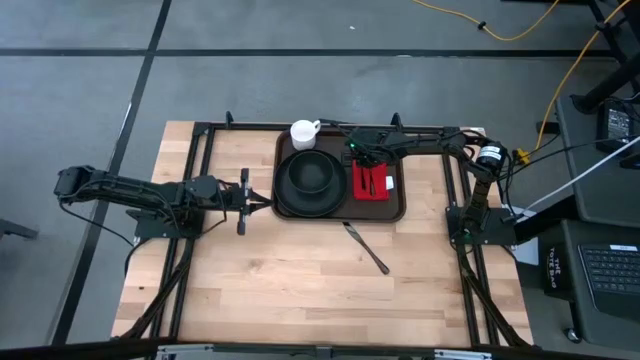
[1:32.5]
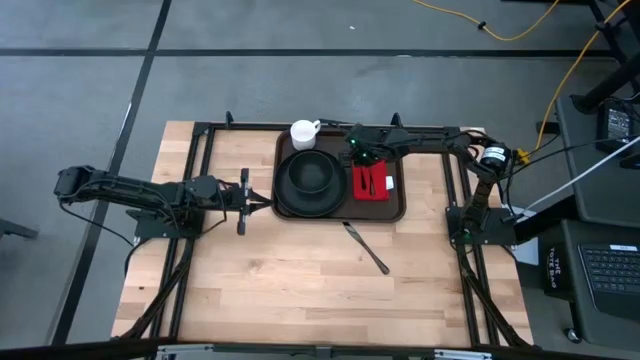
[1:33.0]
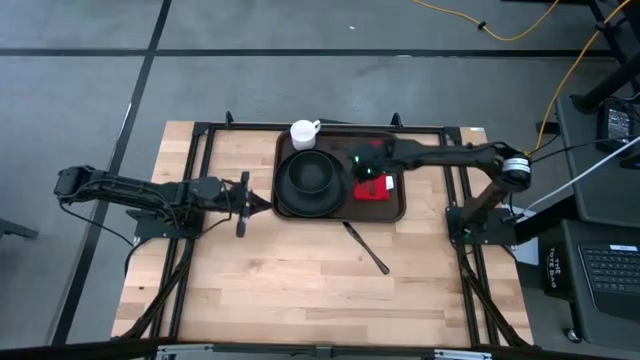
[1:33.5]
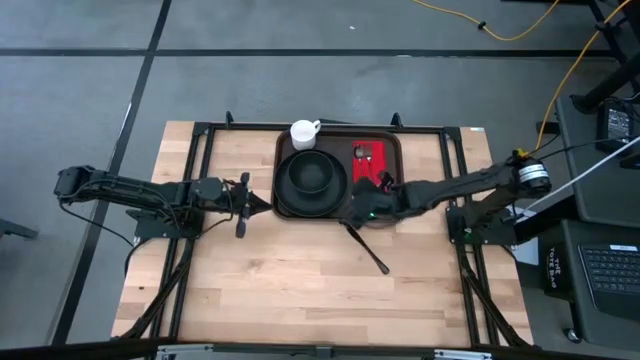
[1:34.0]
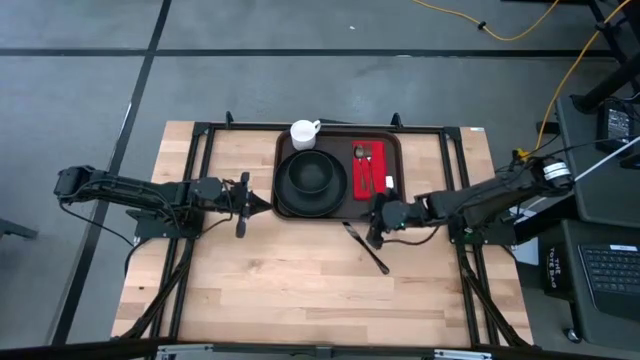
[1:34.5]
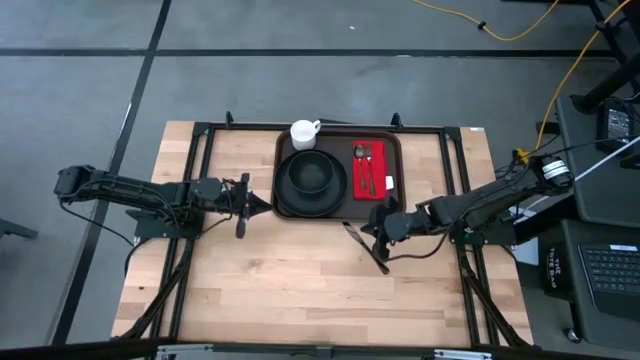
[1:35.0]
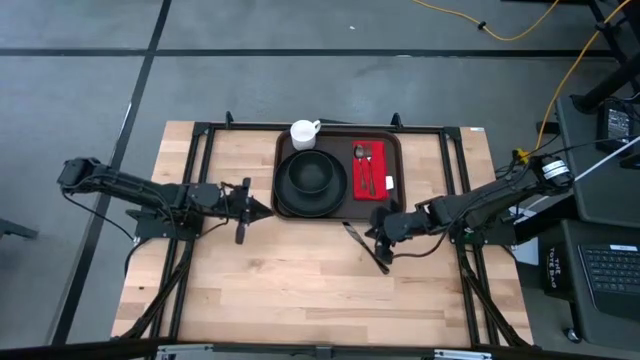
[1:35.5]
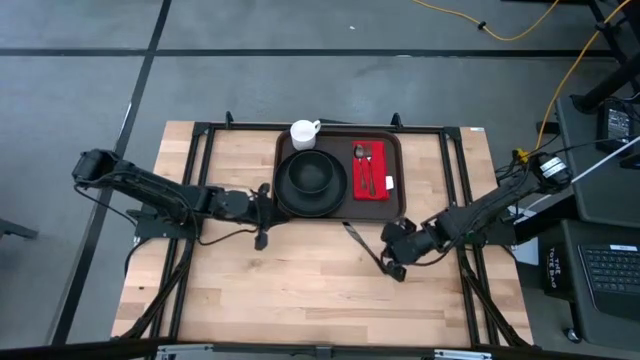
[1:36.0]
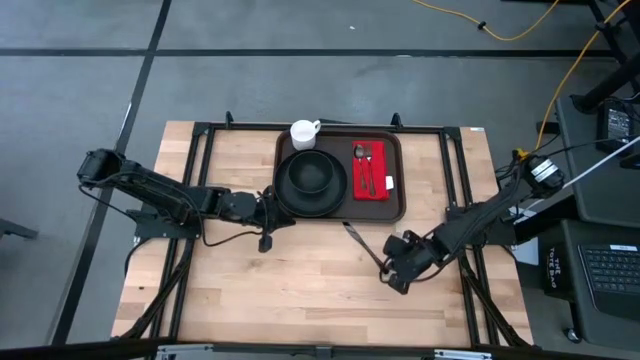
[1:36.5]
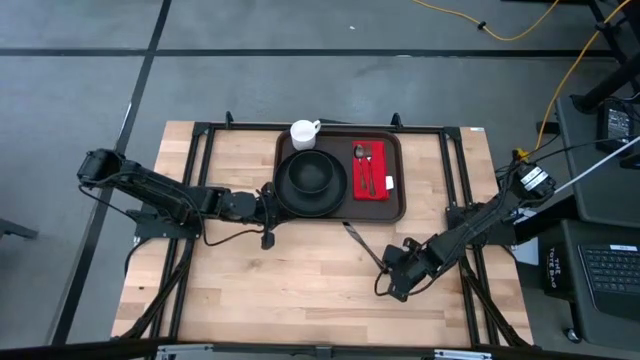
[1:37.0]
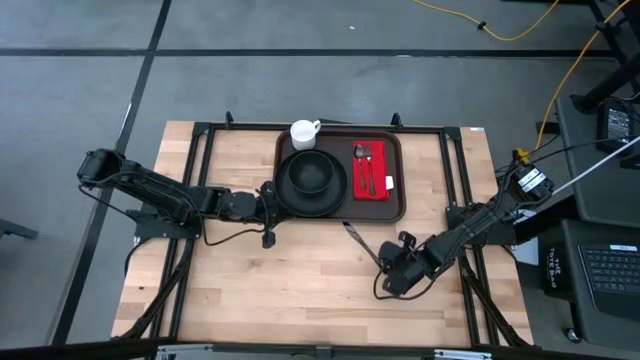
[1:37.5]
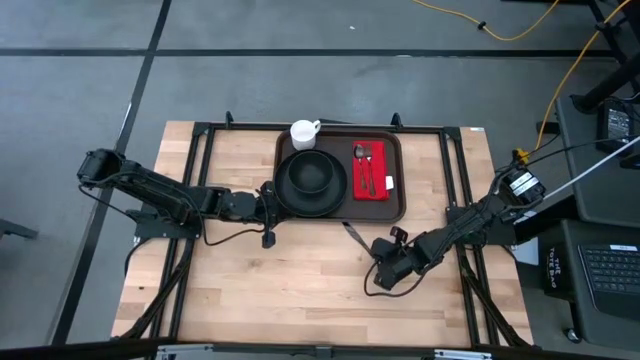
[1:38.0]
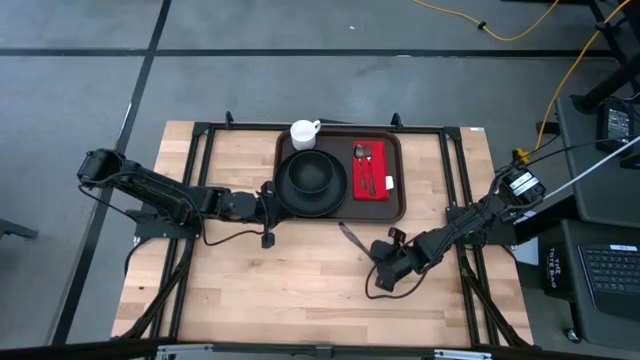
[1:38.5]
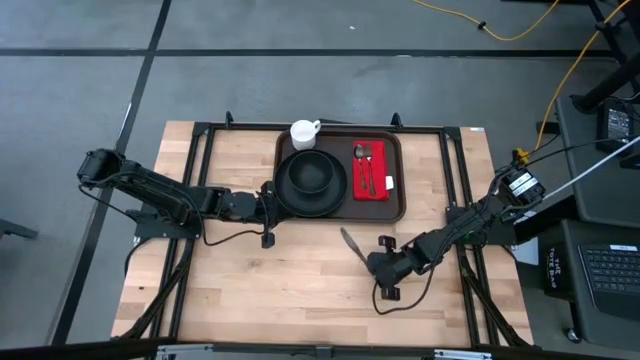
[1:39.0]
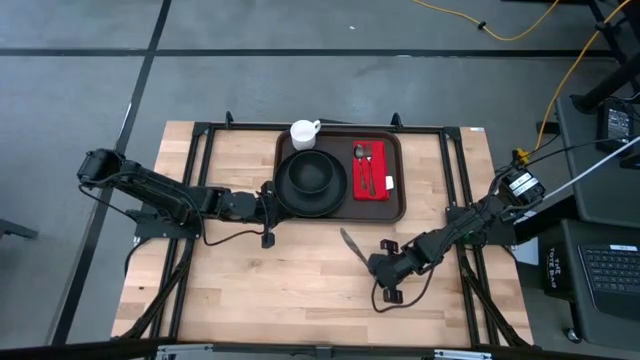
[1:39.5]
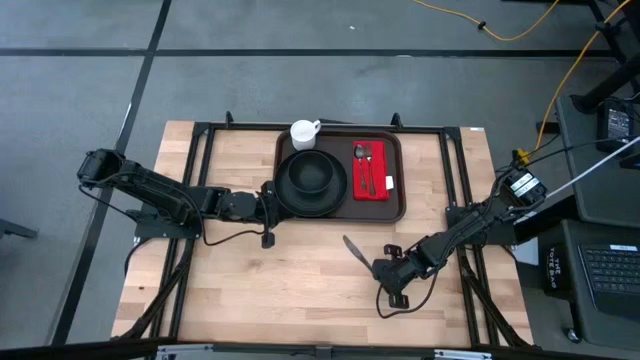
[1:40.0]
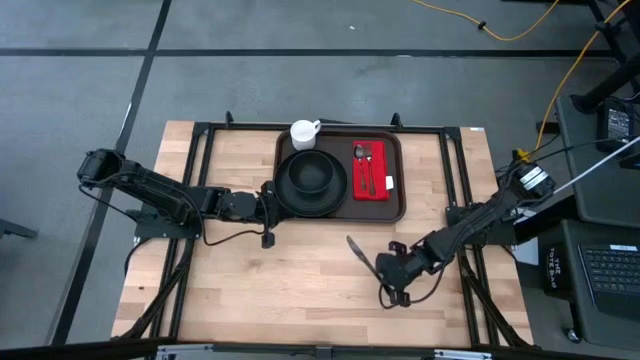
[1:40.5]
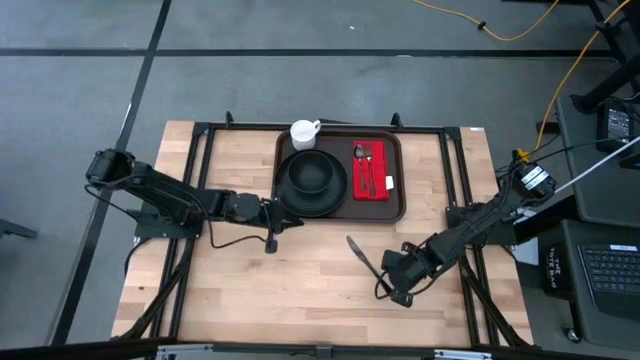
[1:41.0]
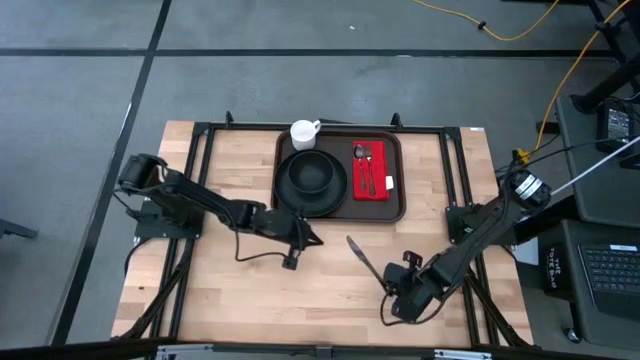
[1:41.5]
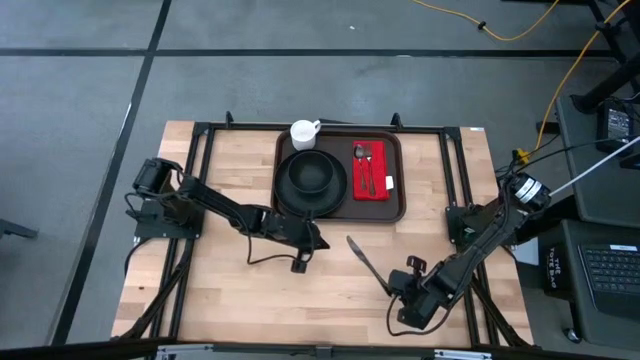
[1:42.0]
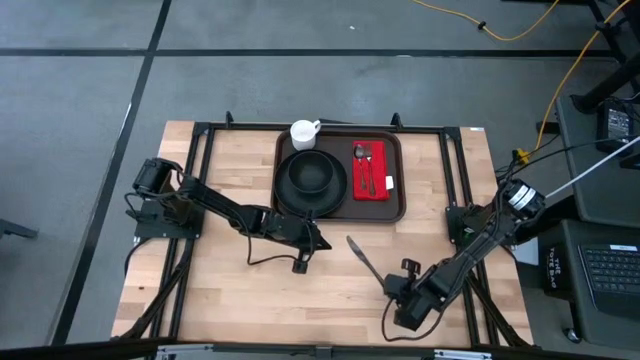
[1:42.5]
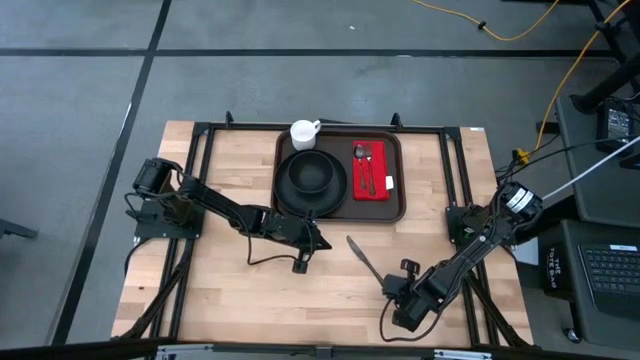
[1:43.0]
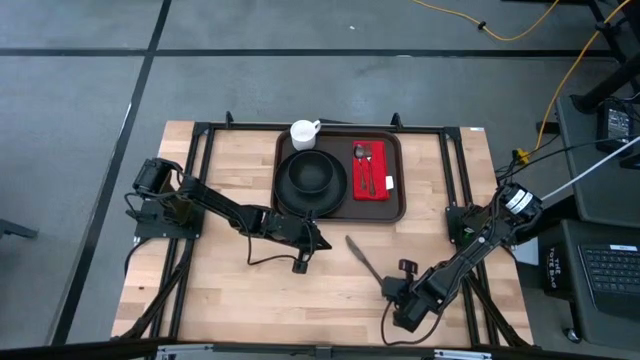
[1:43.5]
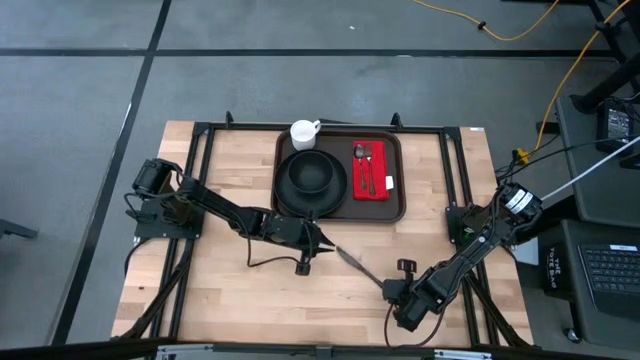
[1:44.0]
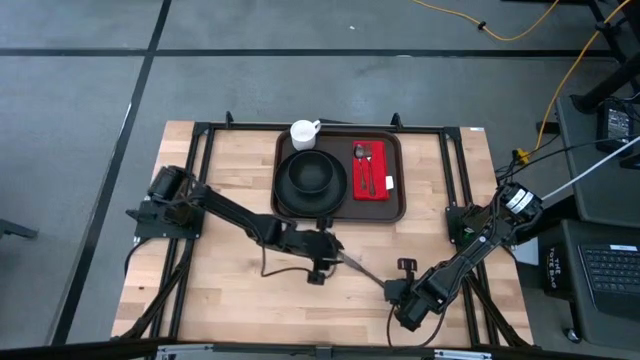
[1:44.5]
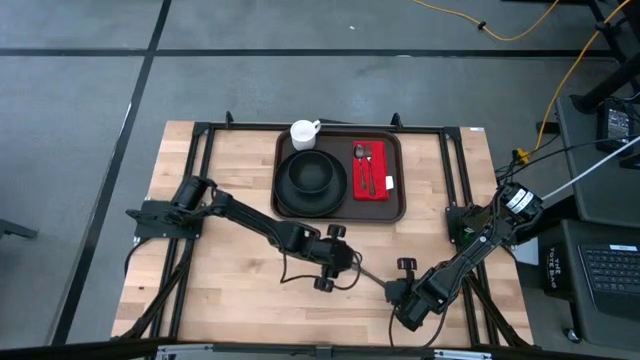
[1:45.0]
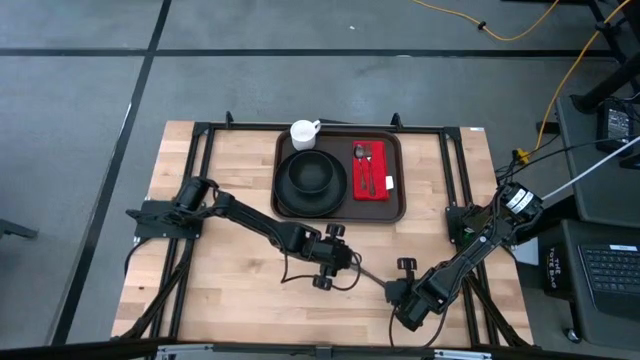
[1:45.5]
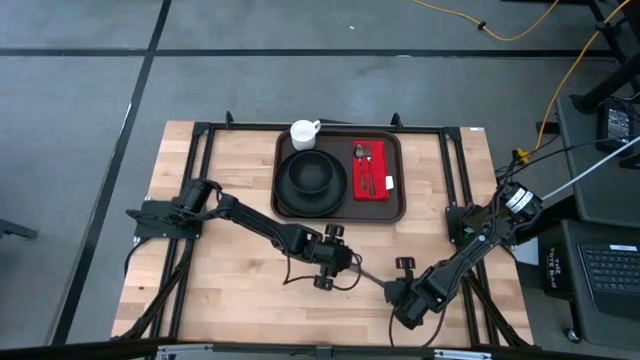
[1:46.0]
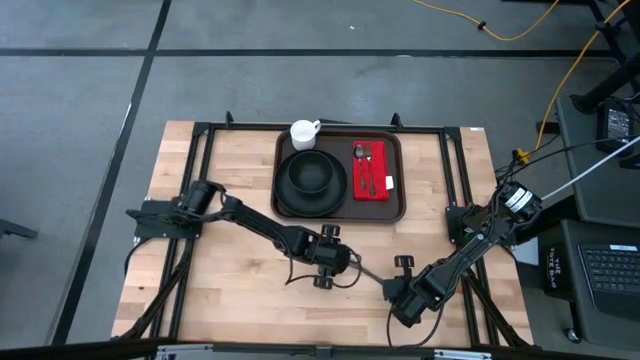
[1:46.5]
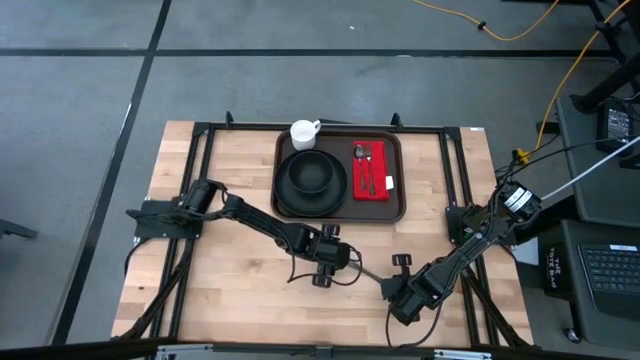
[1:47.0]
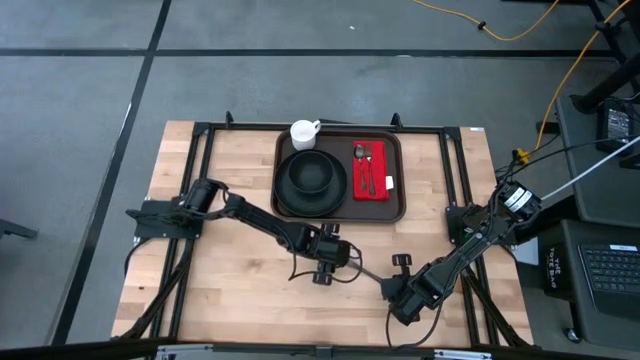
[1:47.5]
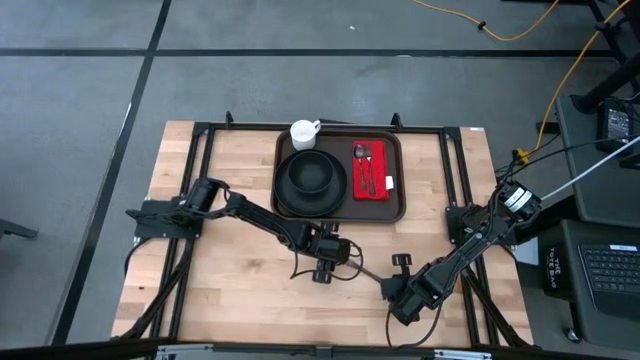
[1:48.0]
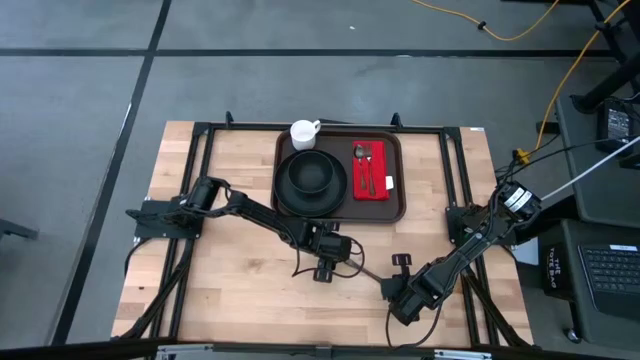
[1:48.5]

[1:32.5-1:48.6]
Task: Set up tray
Put the black knife on the red napkin to the right of the black fork

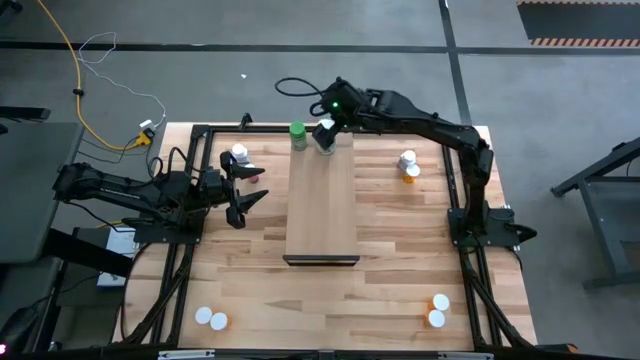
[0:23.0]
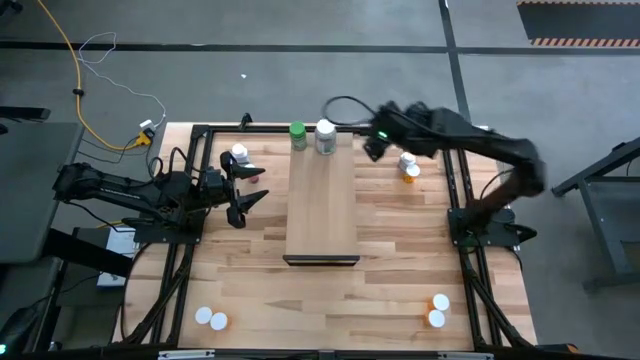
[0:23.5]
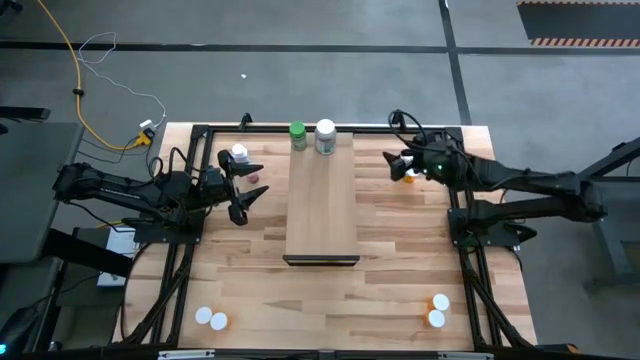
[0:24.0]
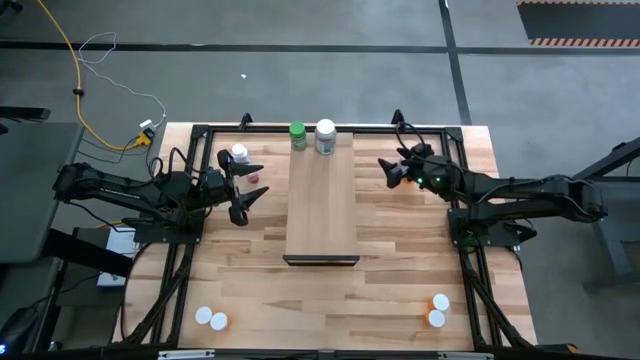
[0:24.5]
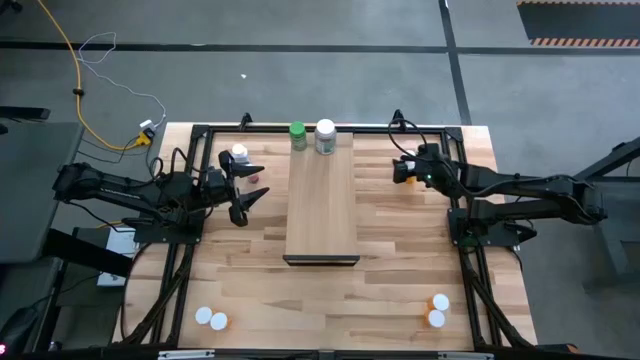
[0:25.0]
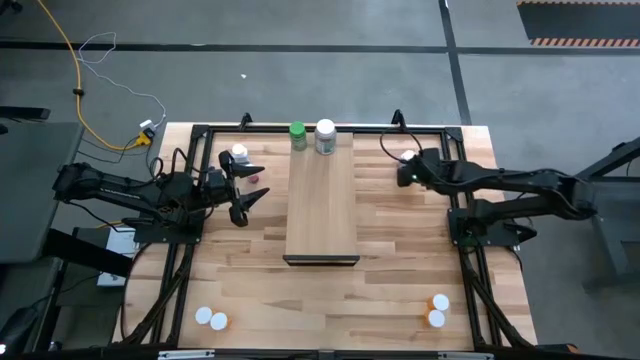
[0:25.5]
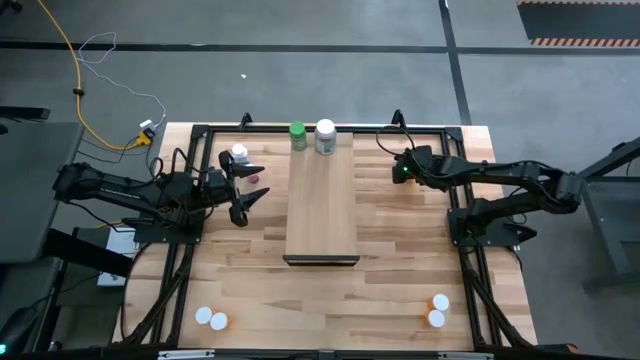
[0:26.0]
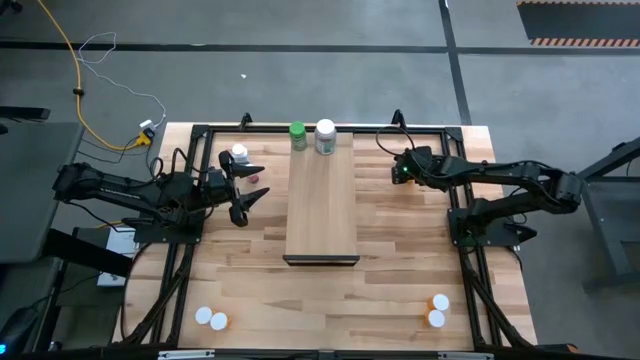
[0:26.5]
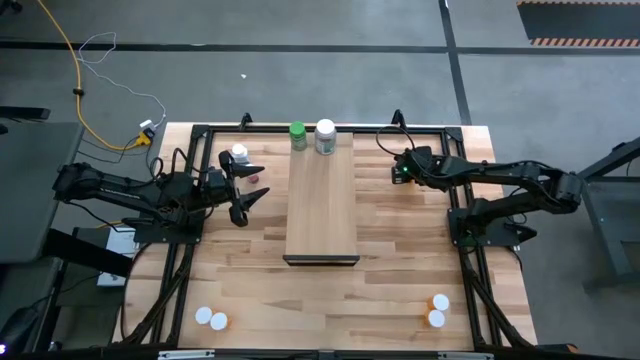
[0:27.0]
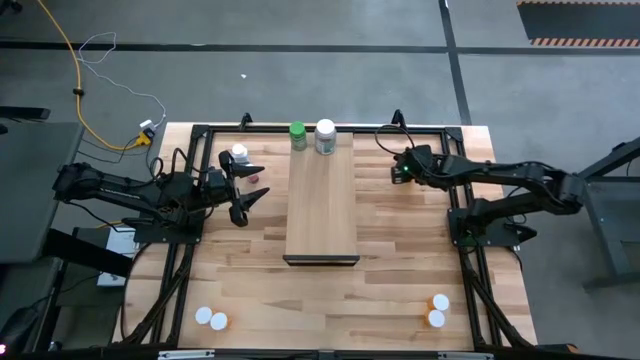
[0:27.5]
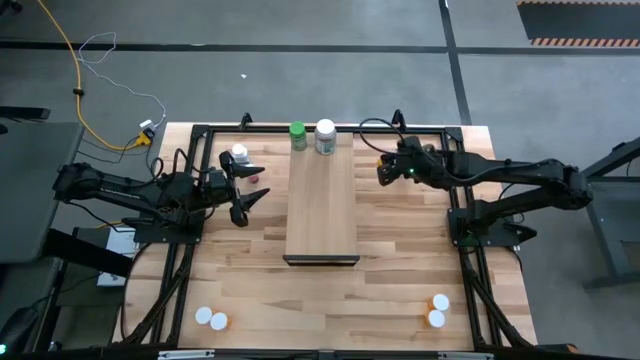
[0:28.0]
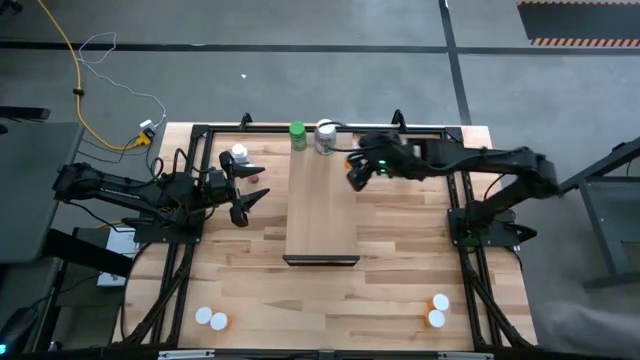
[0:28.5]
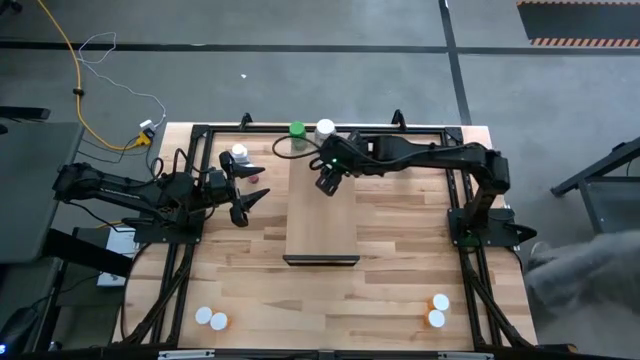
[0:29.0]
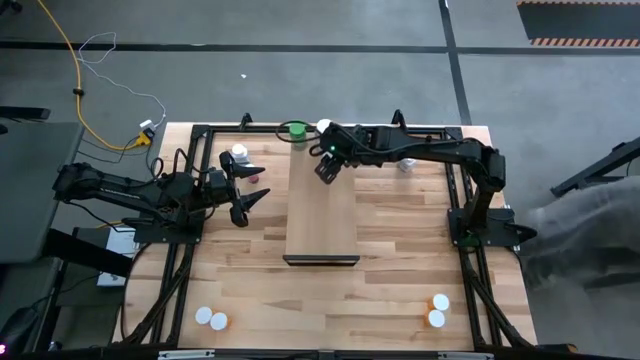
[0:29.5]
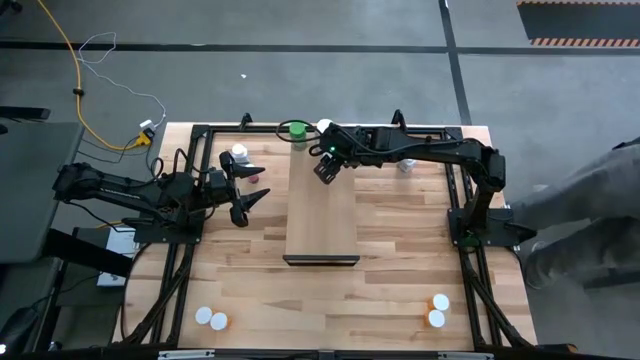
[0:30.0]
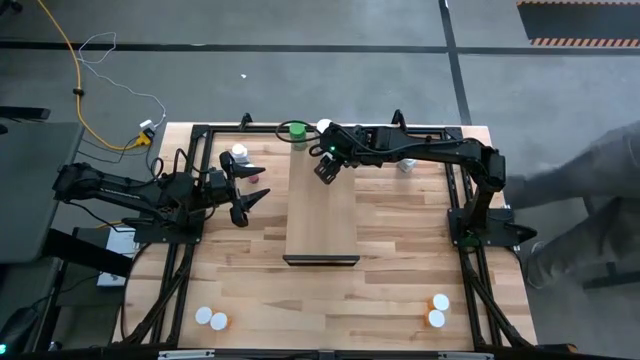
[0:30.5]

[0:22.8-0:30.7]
Task: Pick and place medicine bottles onto shelf by color
Put the orange pill bottle on the shelf
